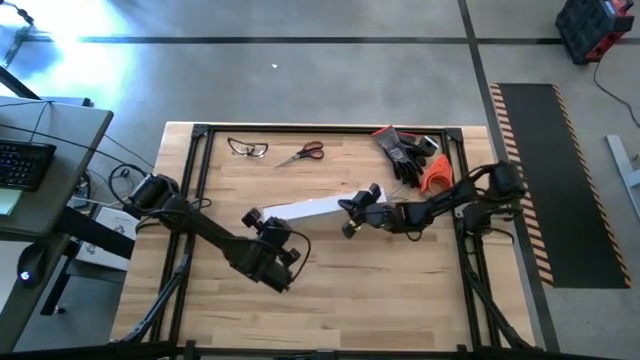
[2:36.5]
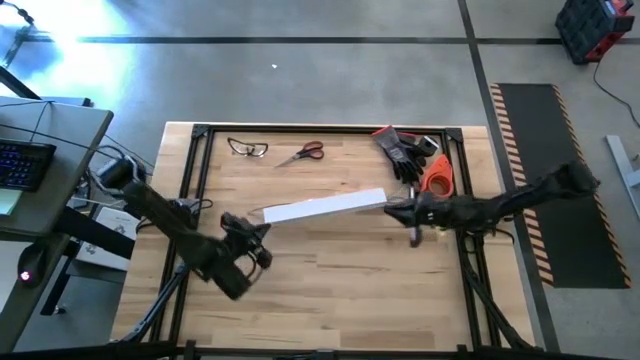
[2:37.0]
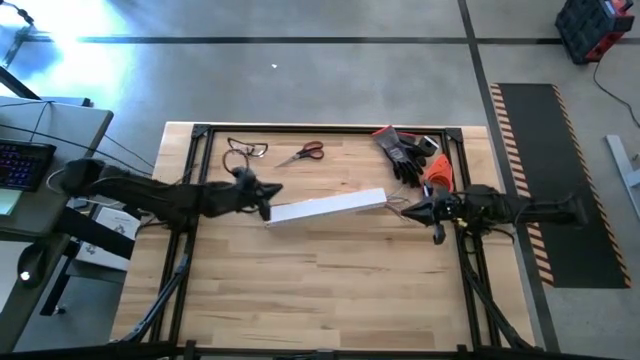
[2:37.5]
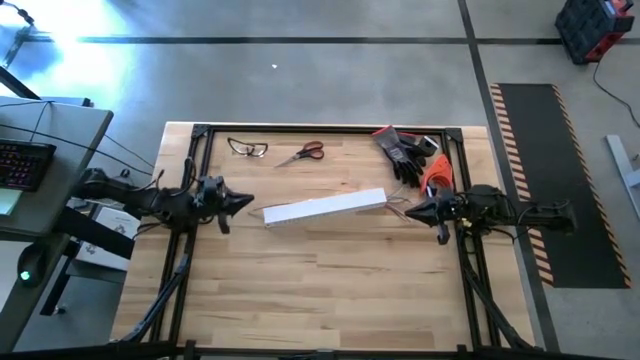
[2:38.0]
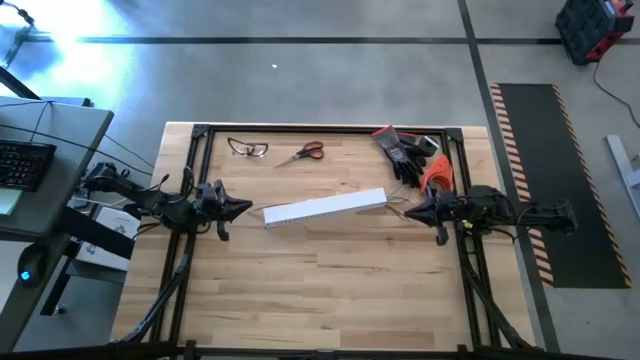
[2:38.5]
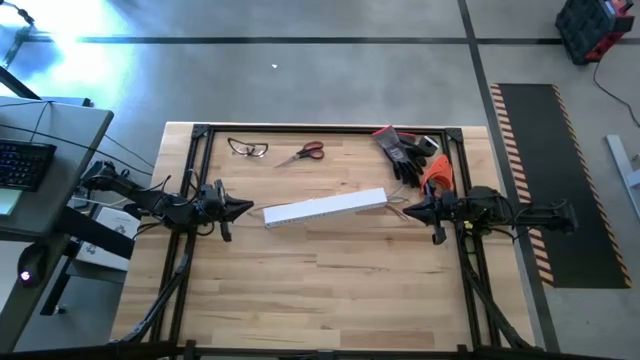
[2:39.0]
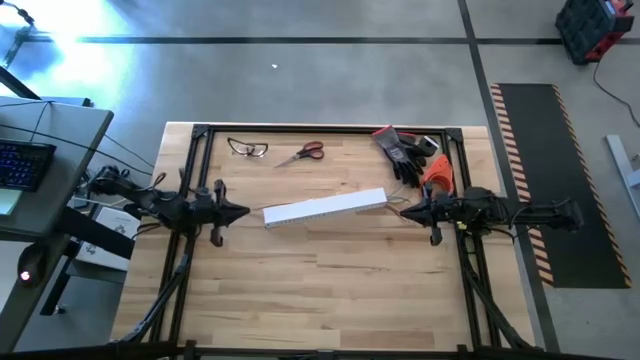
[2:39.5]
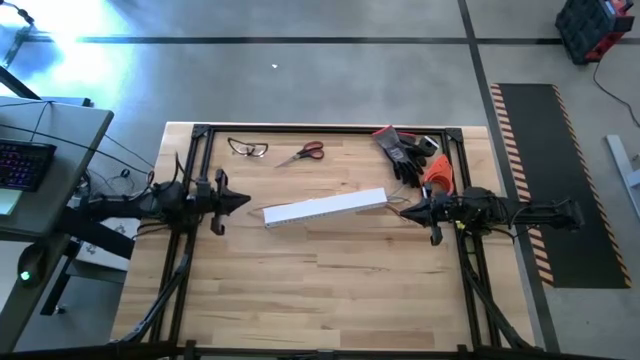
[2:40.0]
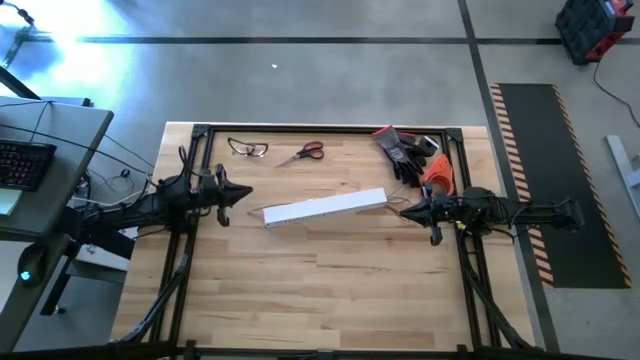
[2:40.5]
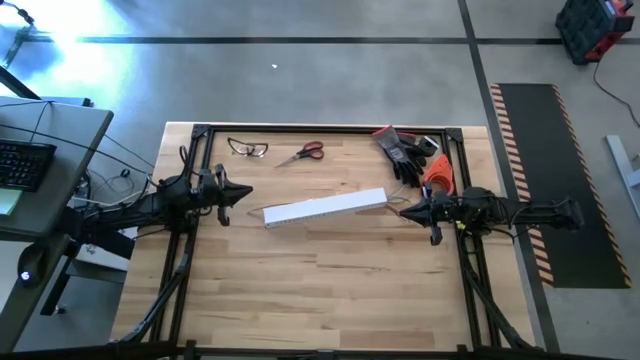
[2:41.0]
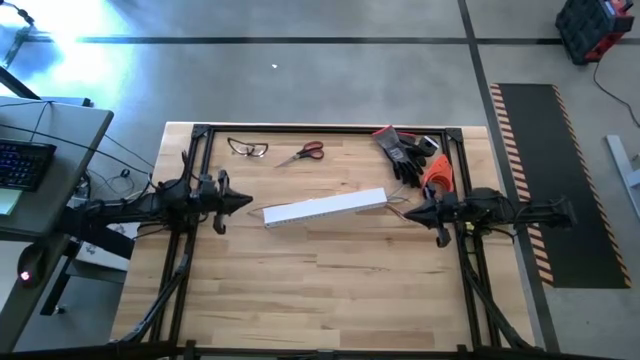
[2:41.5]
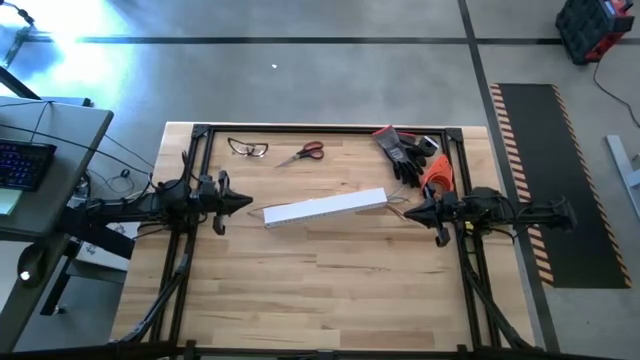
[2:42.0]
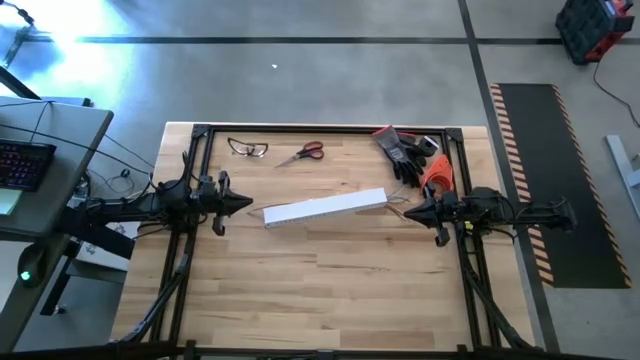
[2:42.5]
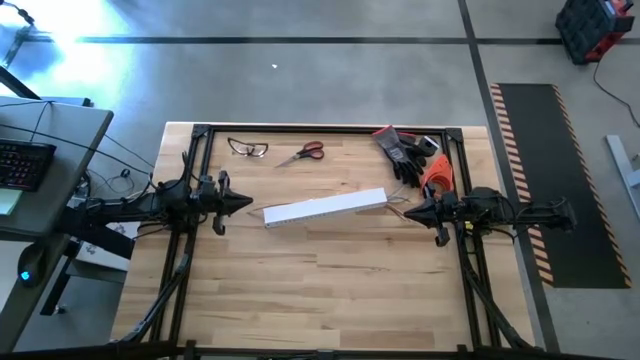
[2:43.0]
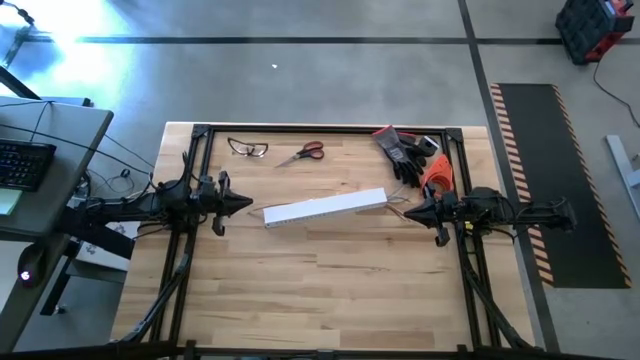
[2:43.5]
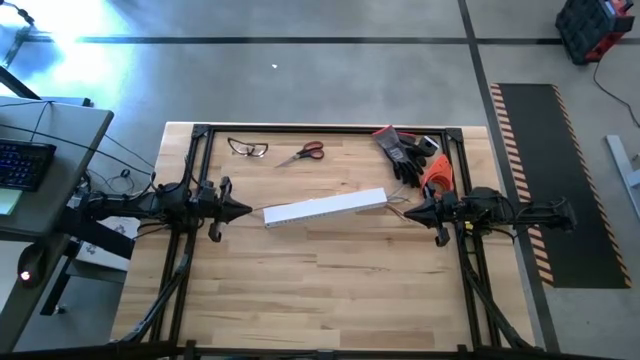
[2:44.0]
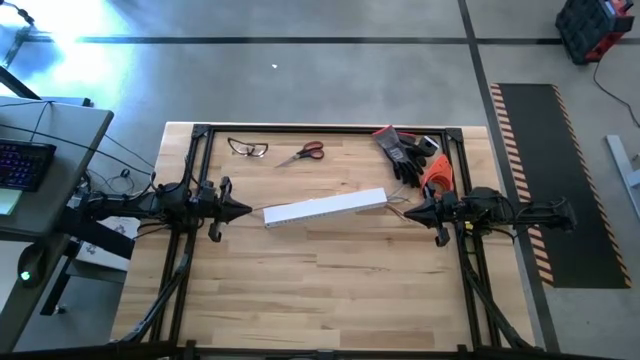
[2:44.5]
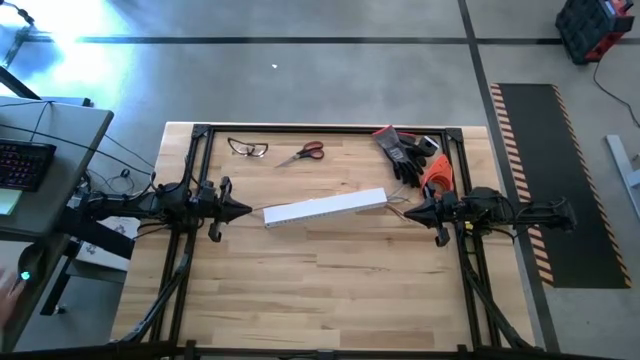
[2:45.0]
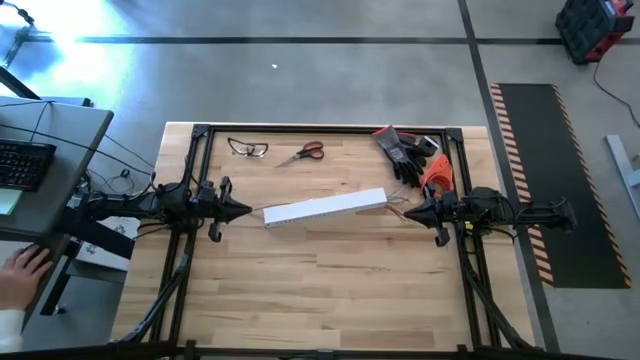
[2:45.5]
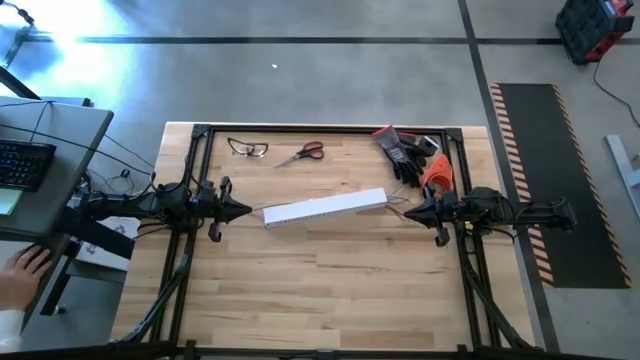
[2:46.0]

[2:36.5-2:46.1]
Task: Ziptie cables
Return to Home Position

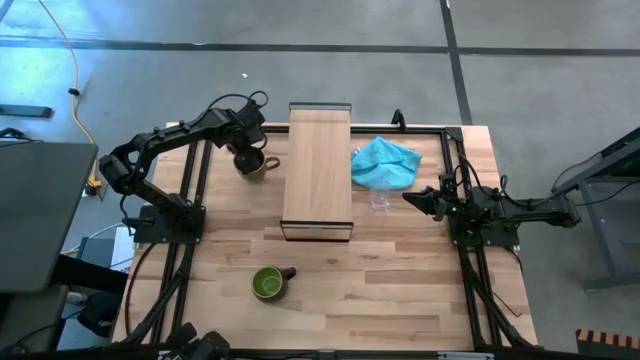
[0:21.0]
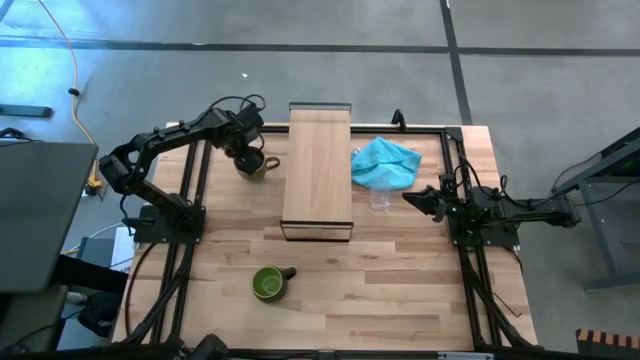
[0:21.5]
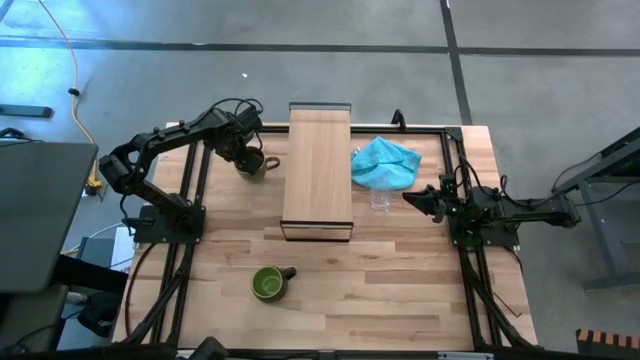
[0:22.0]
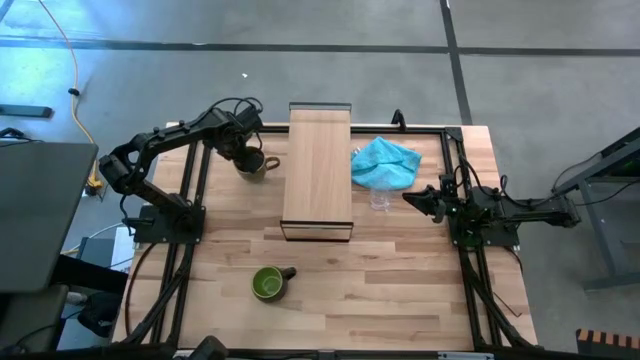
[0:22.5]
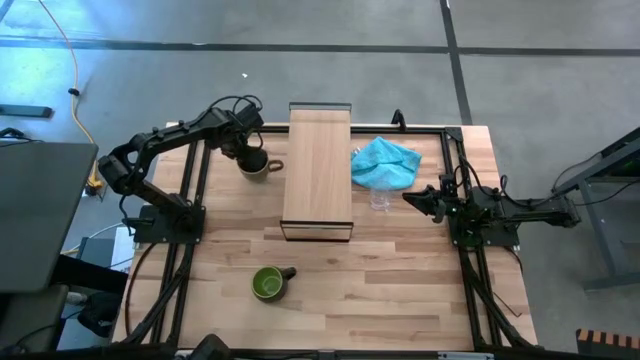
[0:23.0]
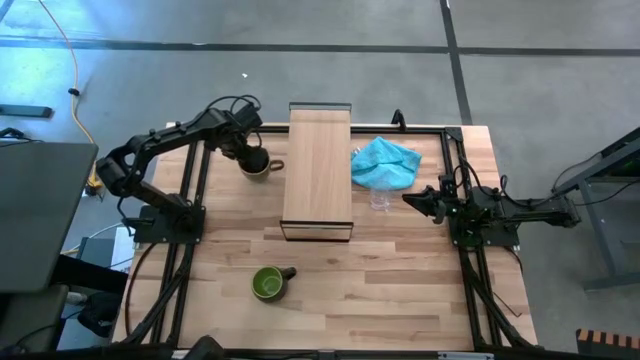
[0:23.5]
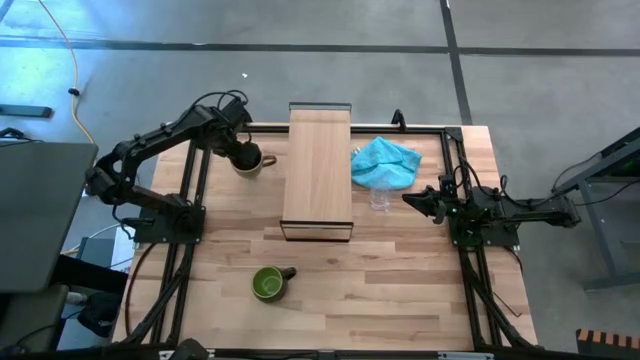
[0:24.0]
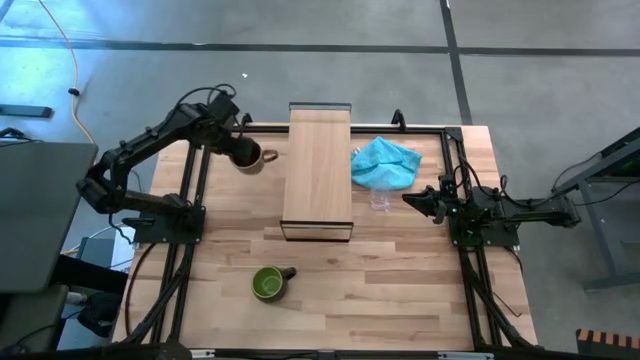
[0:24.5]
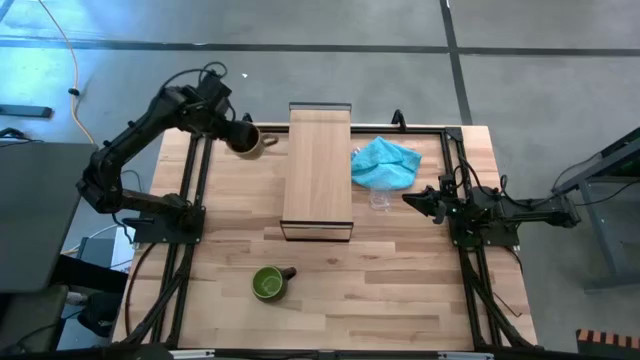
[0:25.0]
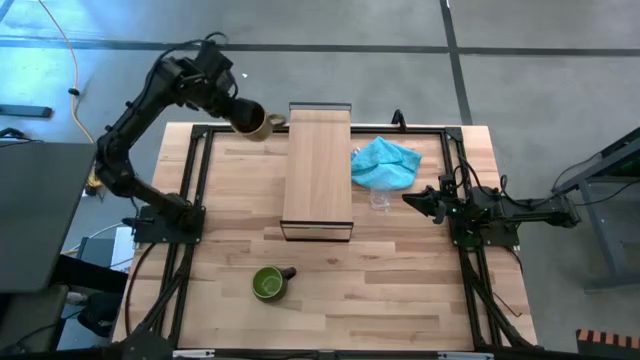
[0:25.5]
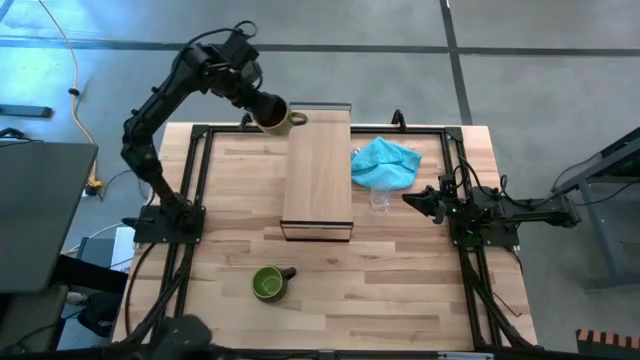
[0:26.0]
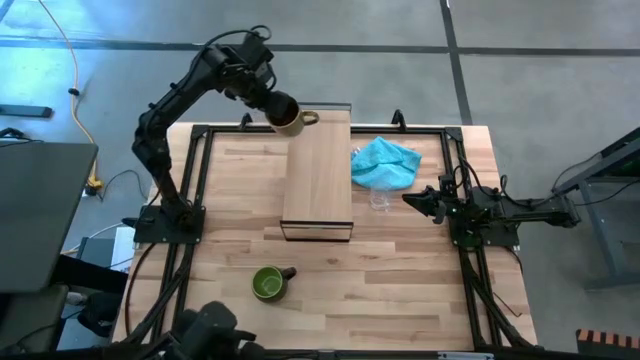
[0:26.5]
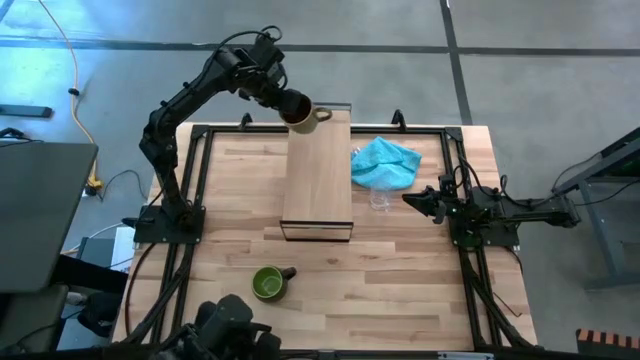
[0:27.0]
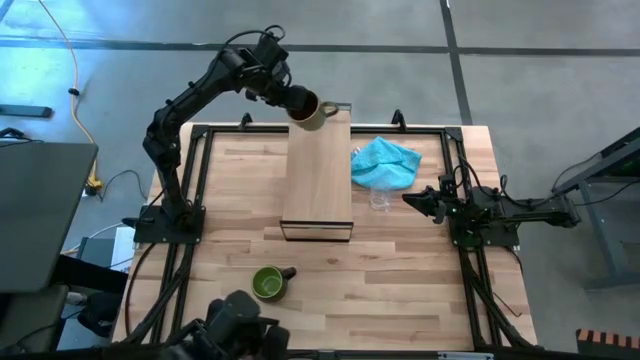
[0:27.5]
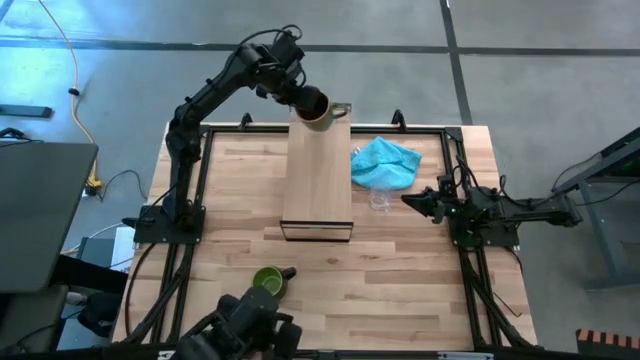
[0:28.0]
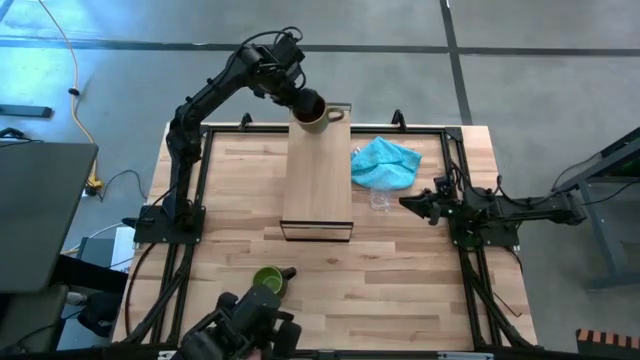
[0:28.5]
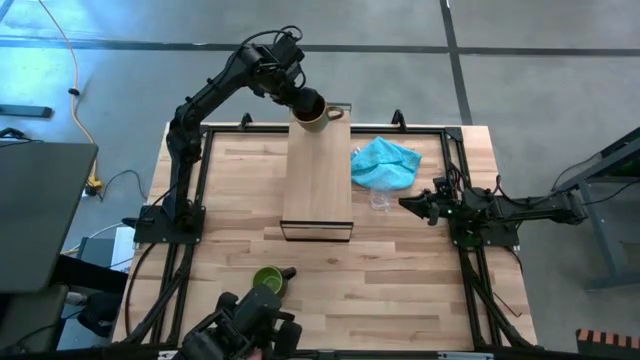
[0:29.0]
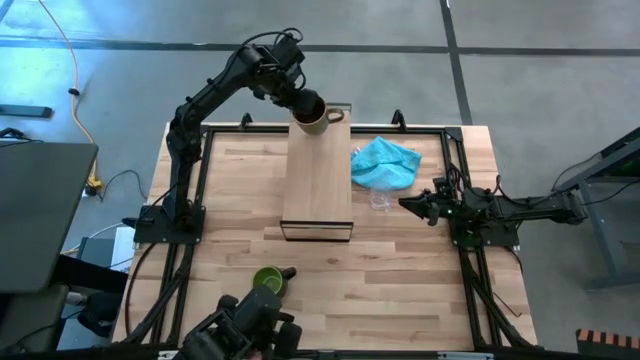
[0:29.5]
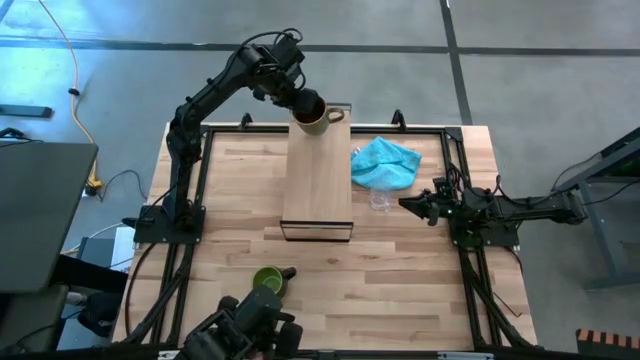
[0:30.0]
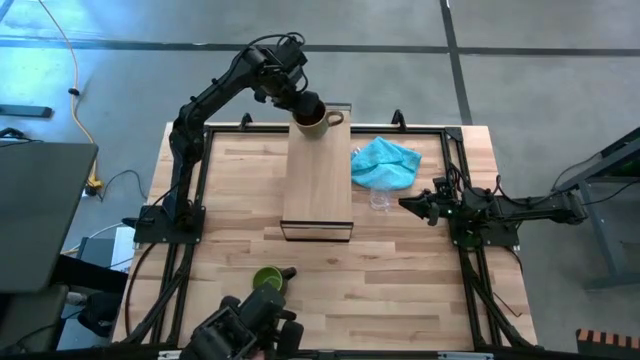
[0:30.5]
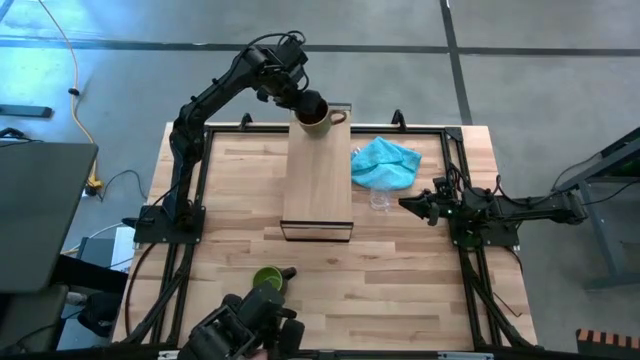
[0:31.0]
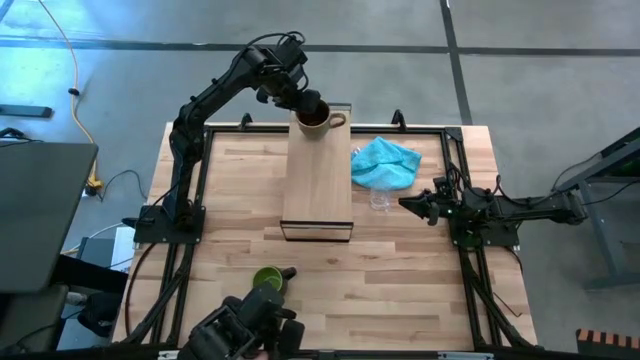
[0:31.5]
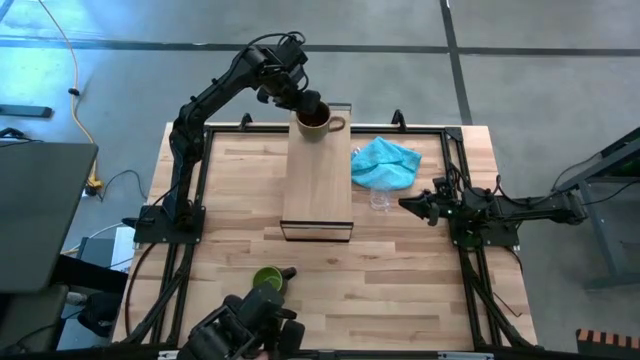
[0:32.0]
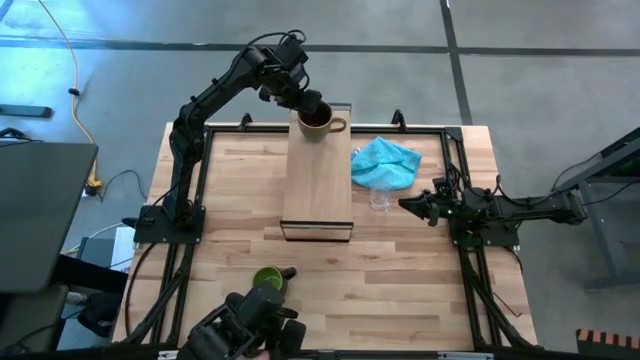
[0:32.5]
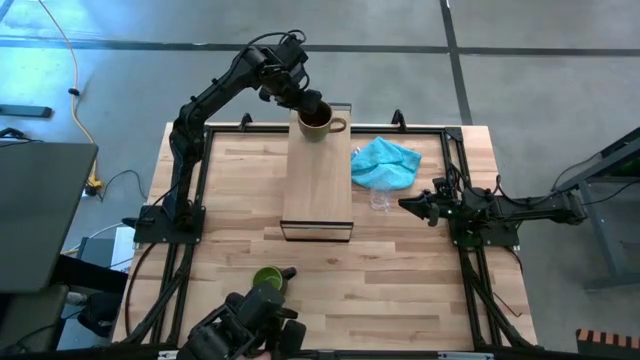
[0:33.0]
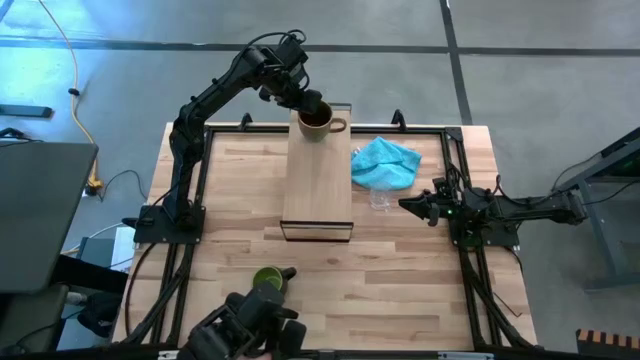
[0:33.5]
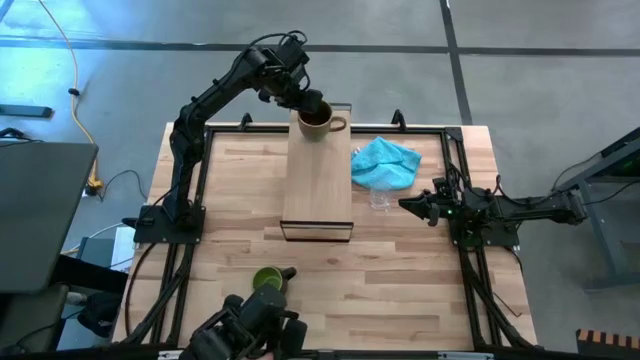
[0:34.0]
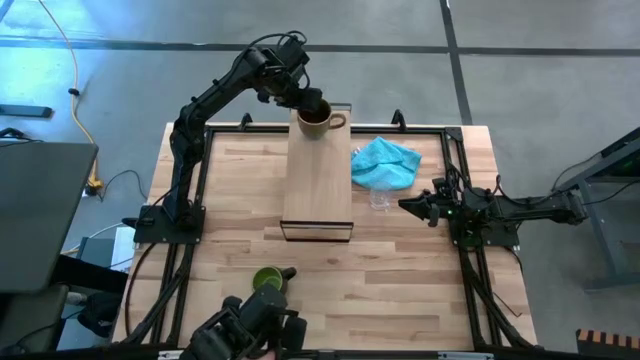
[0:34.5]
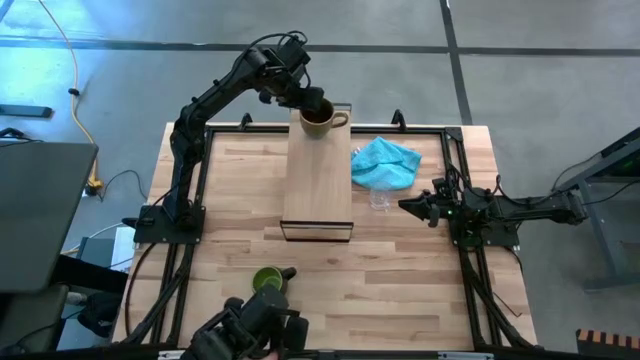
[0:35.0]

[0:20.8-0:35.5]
Task: Stack small to large cups/mugs on shelf
Put the brown and green mug on the shelf
